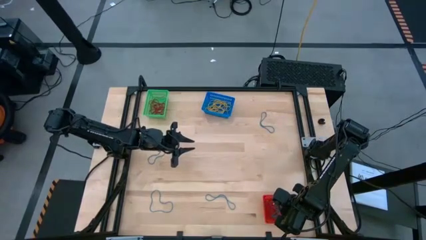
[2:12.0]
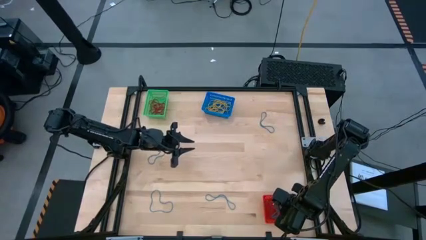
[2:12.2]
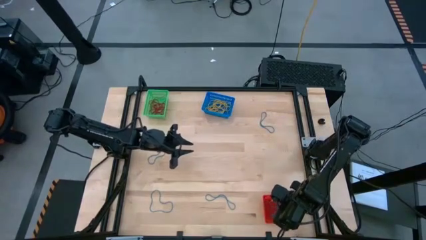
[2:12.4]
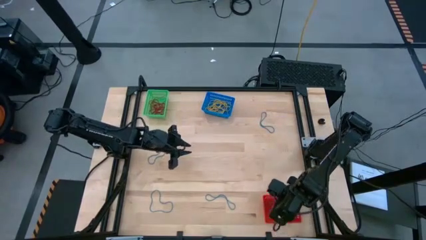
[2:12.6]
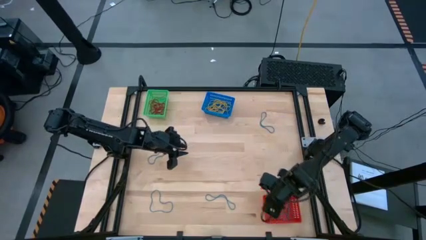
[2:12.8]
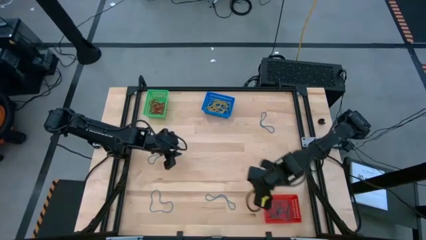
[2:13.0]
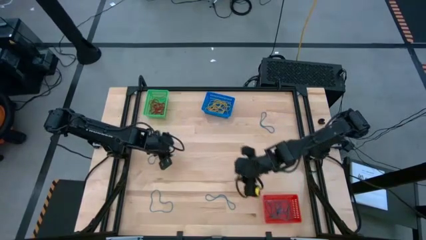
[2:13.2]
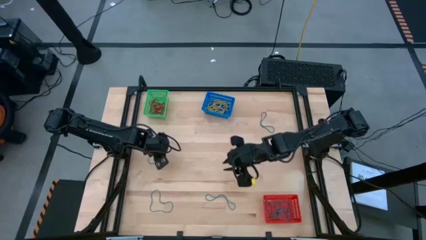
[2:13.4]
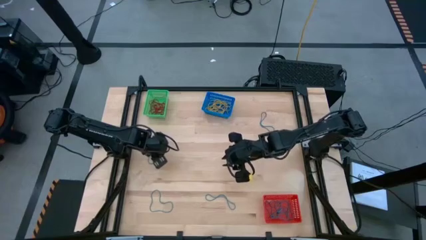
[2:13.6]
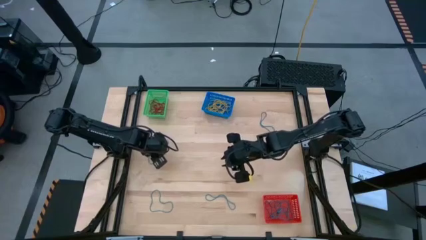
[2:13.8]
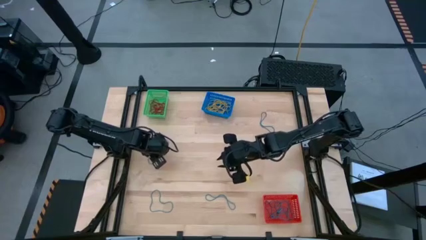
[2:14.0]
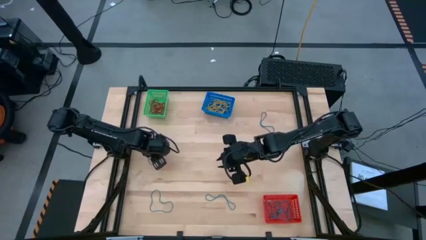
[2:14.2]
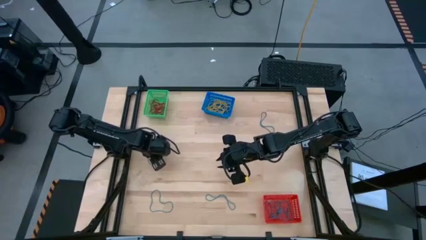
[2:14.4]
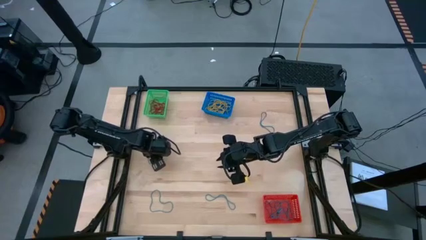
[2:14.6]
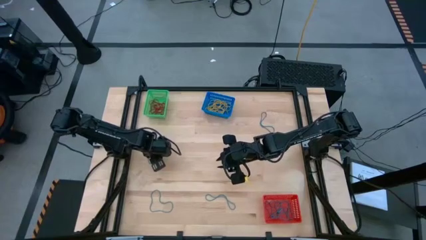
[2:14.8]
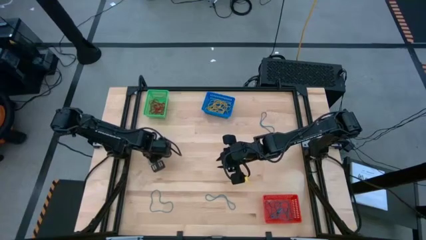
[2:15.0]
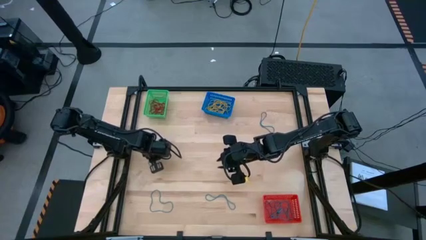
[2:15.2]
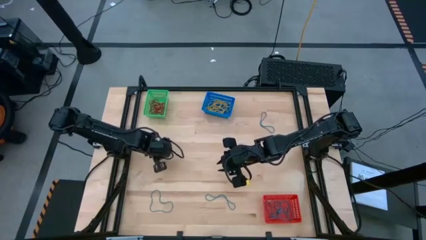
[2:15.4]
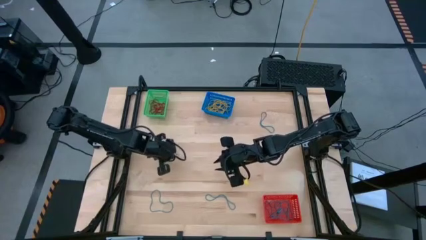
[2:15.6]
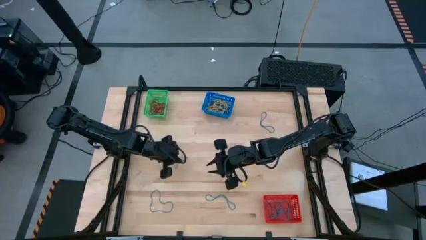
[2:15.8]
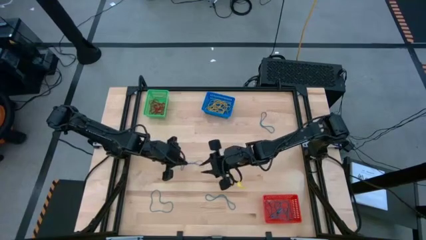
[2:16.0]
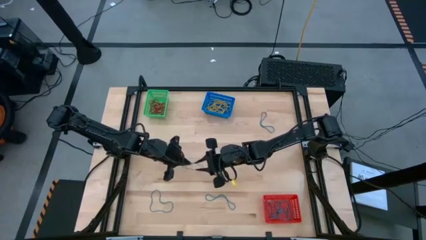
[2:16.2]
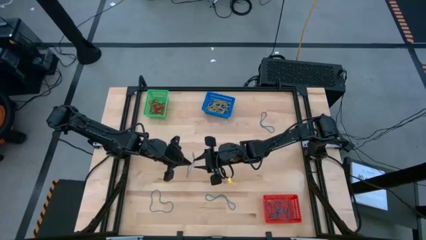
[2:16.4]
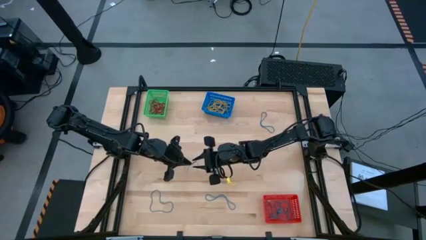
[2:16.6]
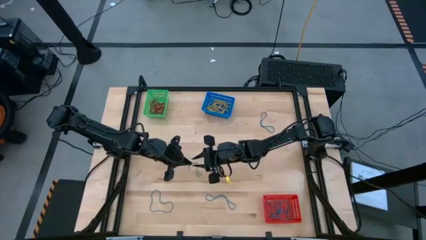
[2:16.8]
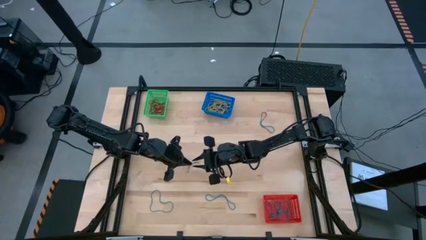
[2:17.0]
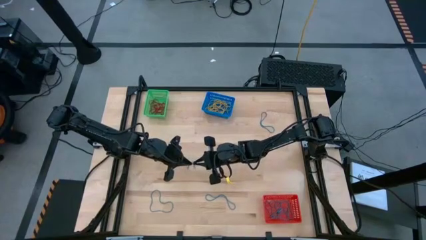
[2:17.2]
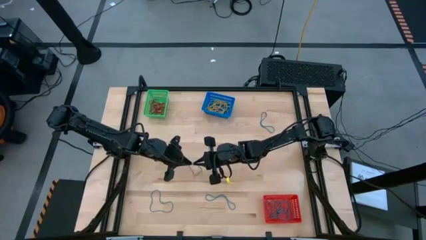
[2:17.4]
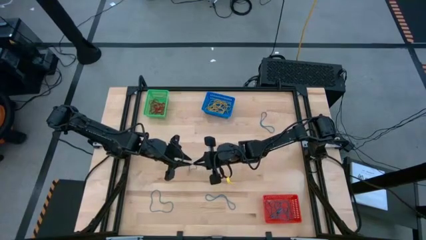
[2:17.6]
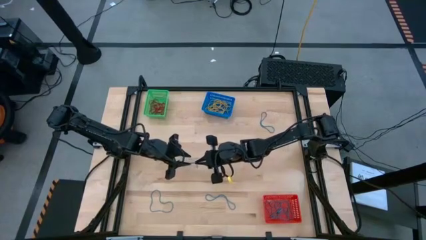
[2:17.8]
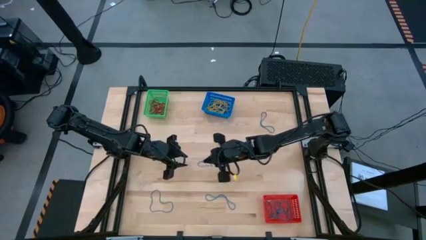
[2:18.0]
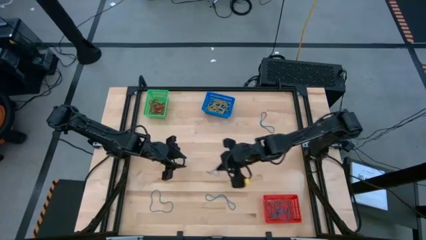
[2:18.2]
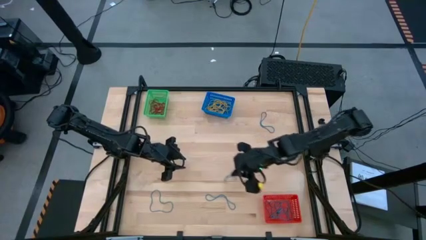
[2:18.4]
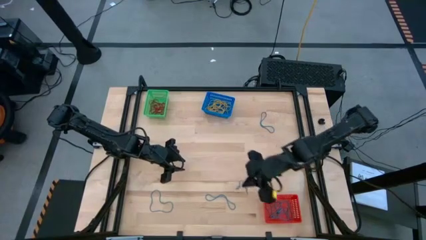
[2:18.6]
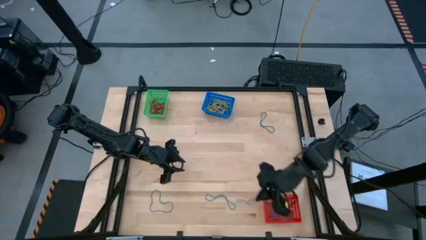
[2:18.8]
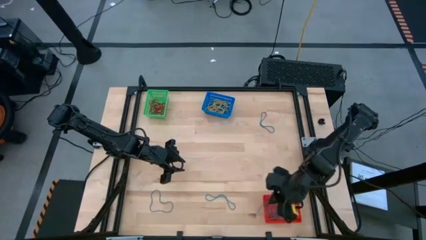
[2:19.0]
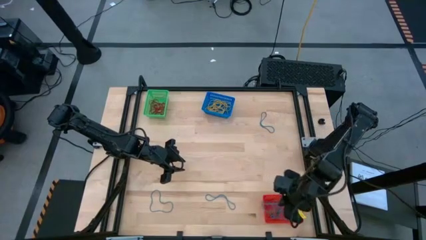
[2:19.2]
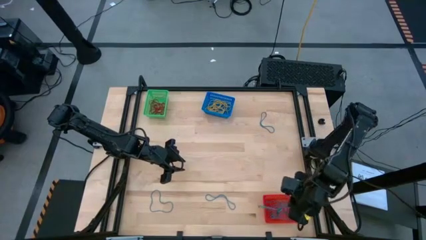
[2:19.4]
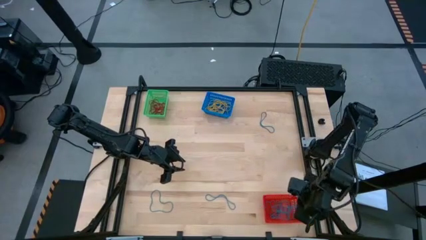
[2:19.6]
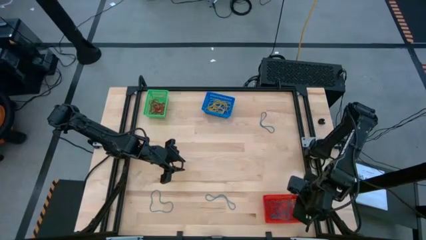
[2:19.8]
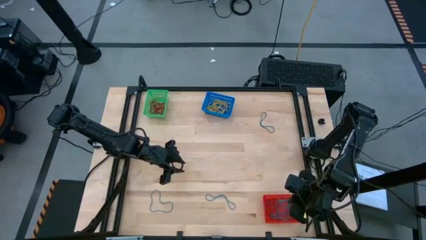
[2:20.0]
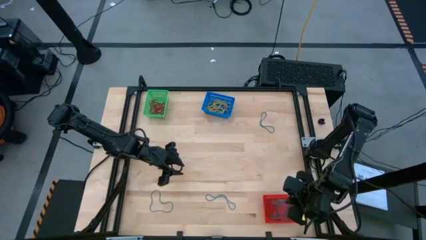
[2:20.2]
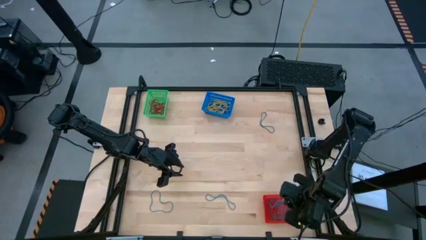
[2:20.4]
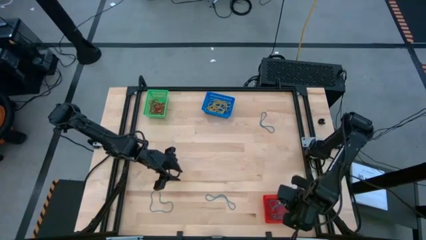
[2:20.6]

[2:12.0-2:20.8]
Task: Sort rubber bands into baskets
Put the blue rubber band into the red bin

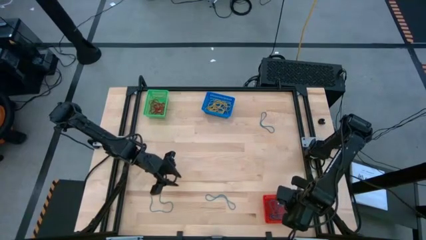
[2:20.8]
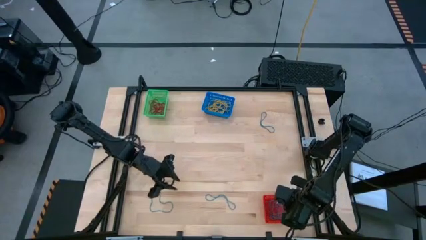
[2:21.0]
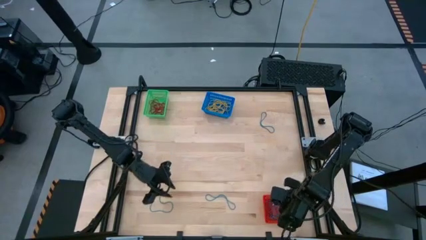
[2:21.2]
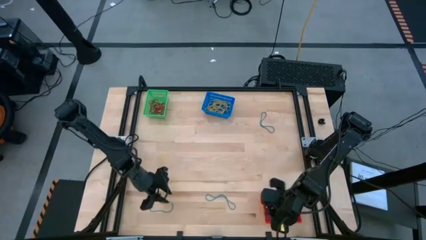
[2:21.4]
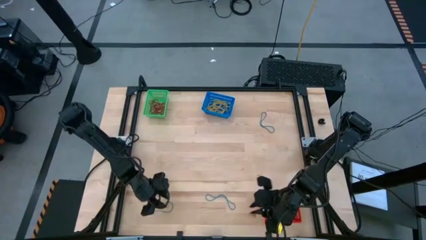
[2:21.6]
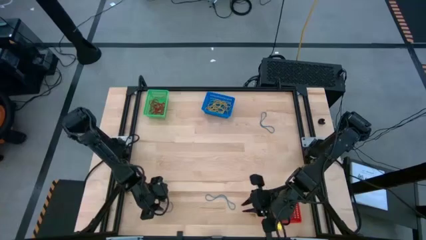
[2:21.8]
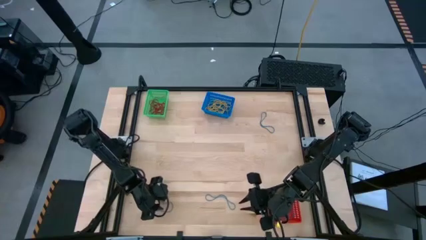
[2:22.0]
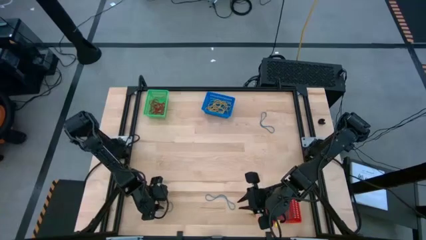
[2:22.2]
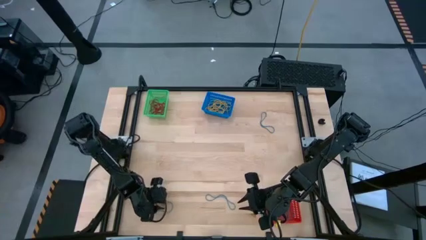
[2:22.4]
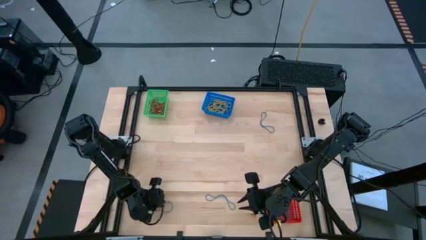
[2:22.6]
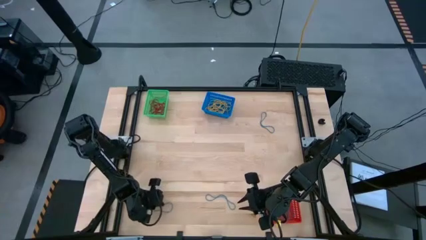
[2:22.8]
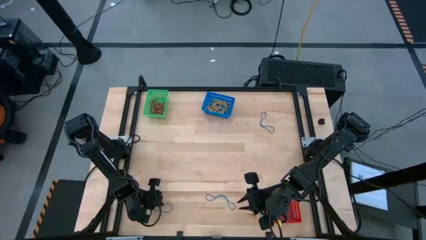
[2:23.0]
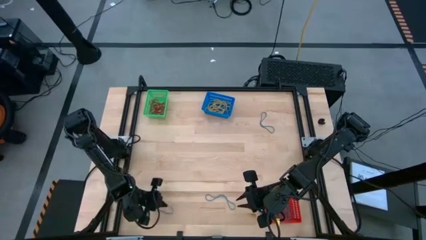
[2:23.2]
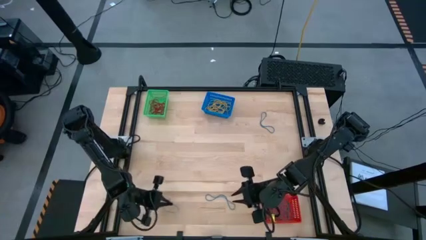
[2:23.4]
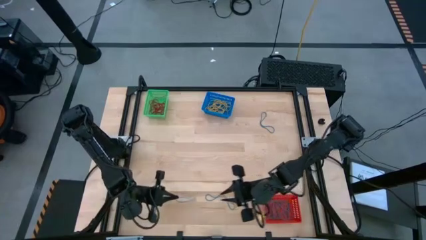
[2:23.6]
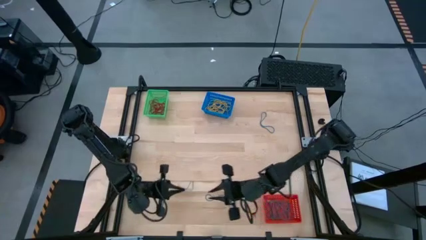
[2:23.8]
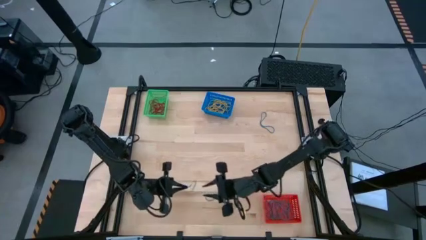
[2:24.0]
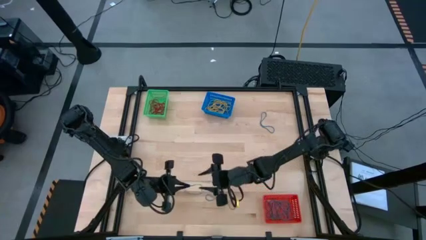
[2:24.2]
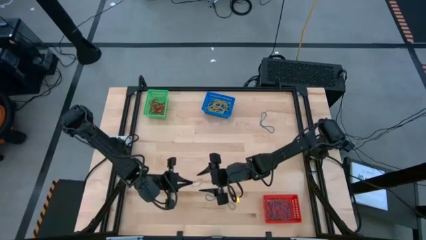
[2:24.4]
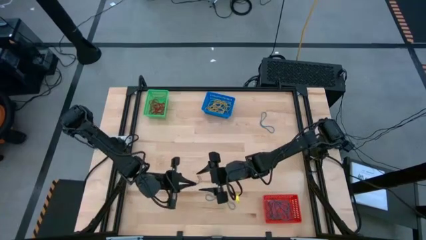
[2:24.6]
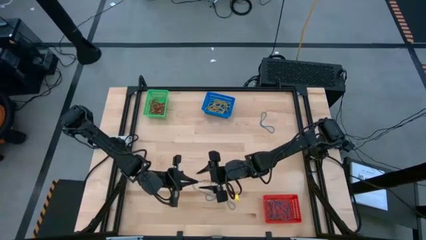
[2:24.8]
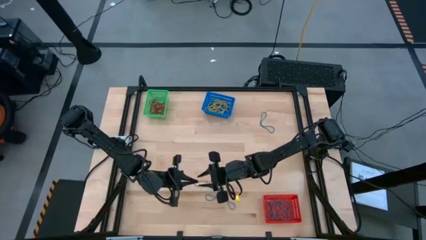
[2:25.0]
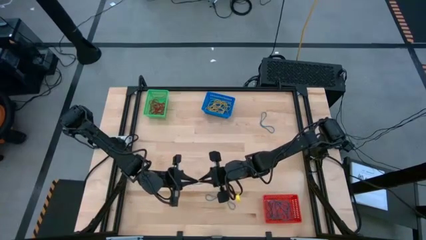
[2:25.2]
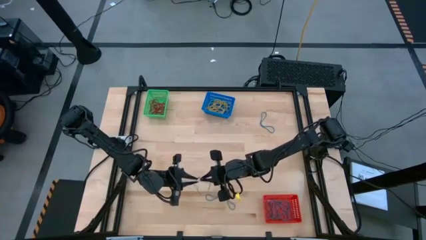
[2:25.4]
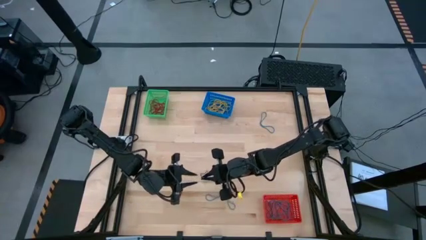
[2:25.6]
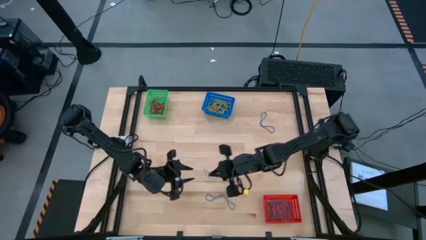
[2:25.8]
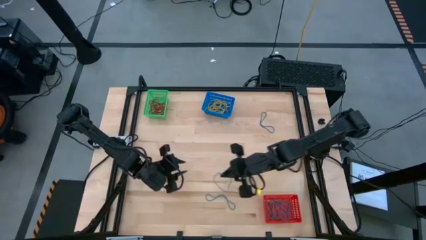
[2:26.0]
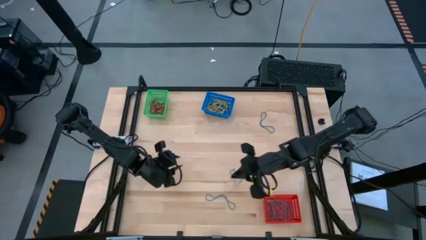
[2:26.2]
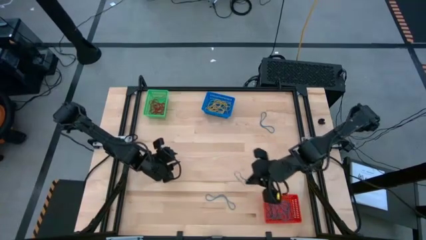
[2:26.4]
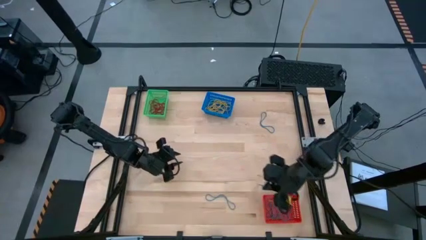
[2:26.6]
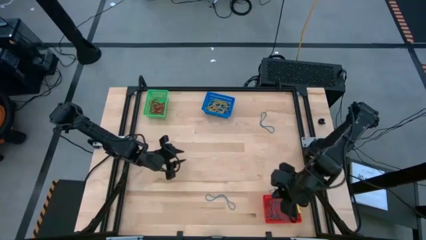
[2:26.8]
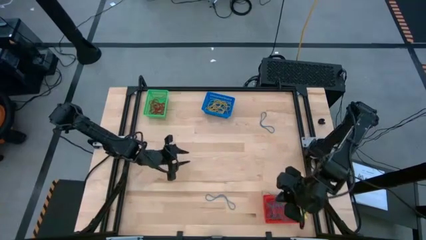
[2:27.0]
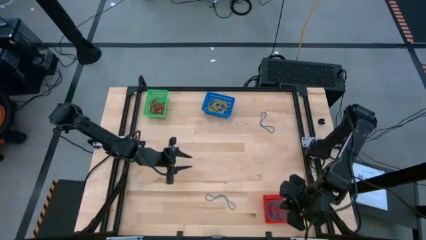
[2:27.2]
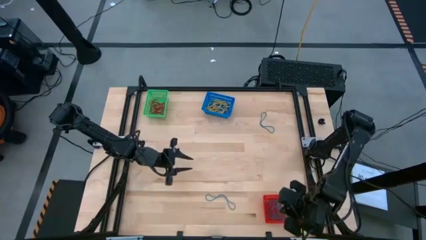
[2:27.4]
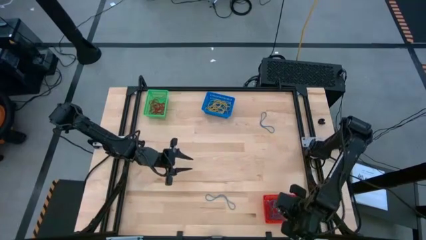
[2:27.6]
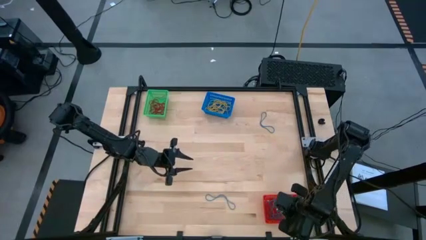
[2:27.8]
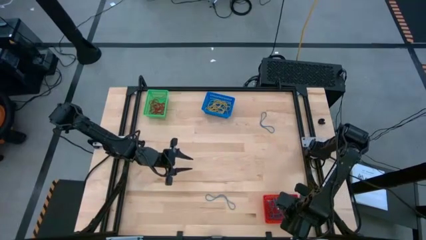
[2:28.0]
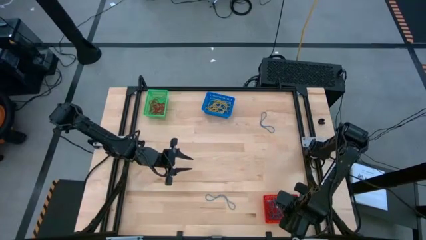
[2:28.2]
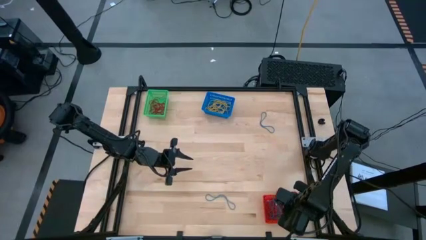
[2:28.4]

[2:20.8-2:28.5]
Put the blue rubber band into the red bin

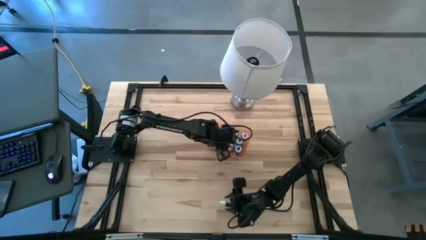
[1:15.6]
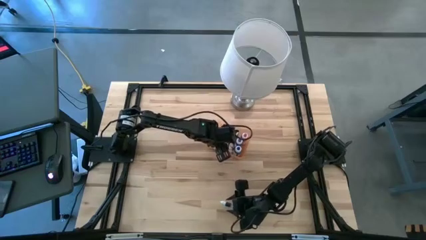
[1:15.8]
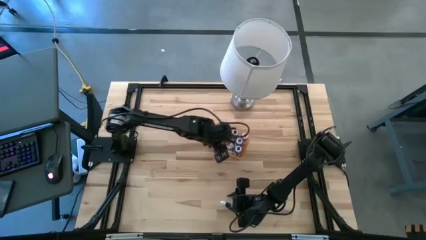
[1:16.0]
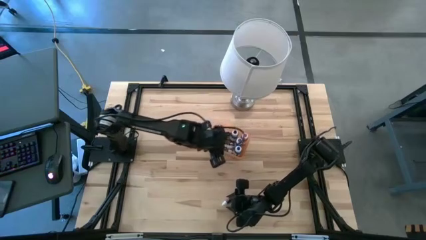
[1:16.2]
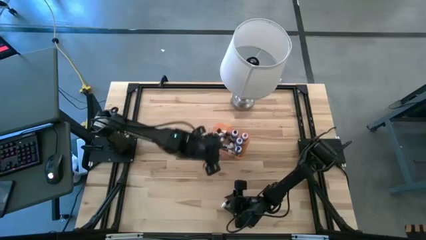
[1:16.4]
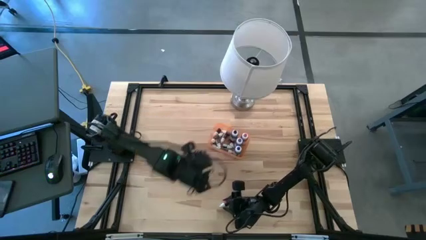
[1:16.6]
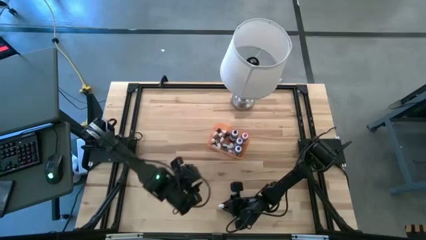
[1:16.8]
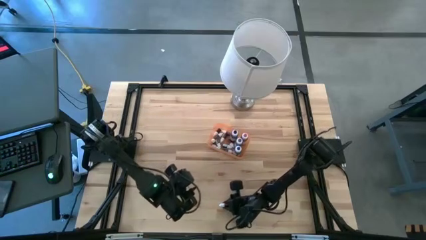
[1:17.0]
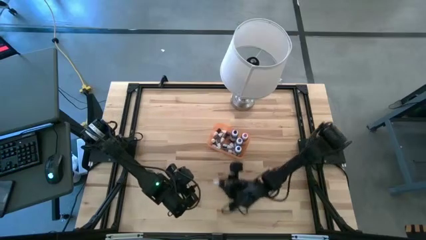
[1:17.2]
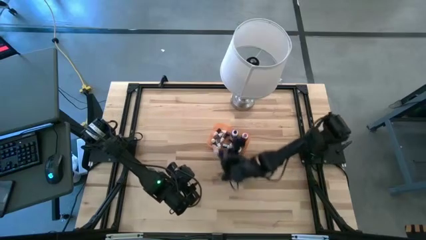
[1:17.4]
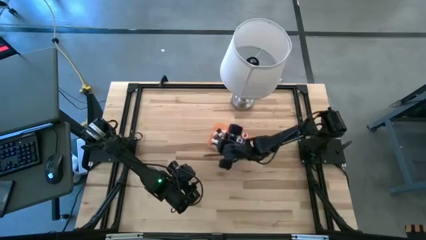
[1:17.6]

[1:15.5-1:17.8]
Task: Pick & Place food coloring
Put the small black food coloring bottle into the orange bin
